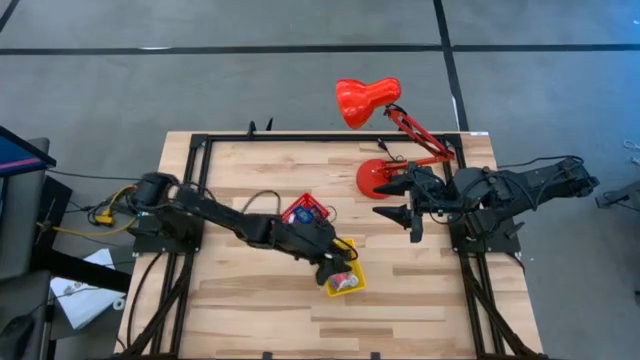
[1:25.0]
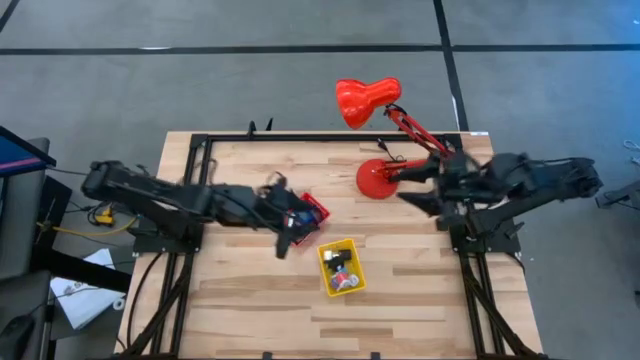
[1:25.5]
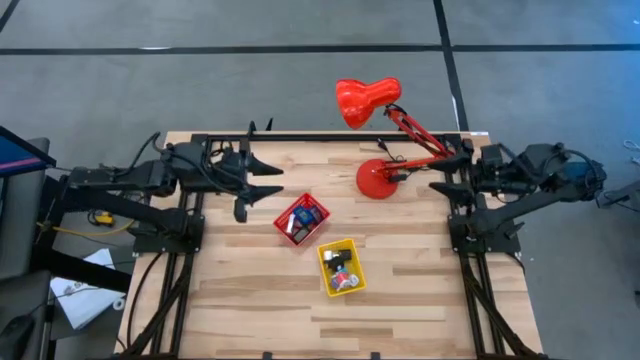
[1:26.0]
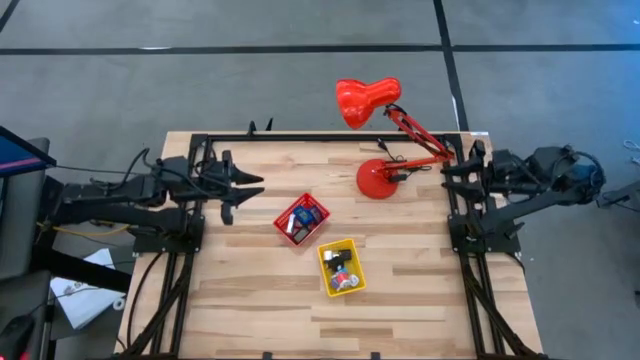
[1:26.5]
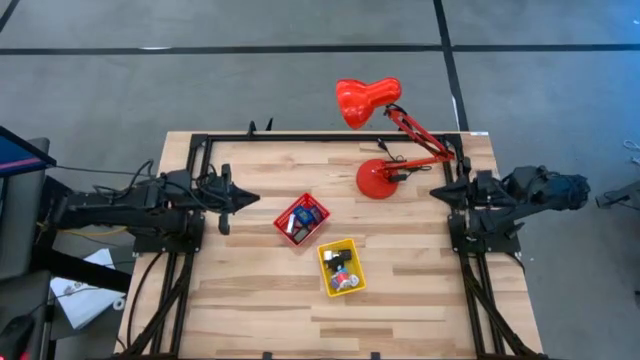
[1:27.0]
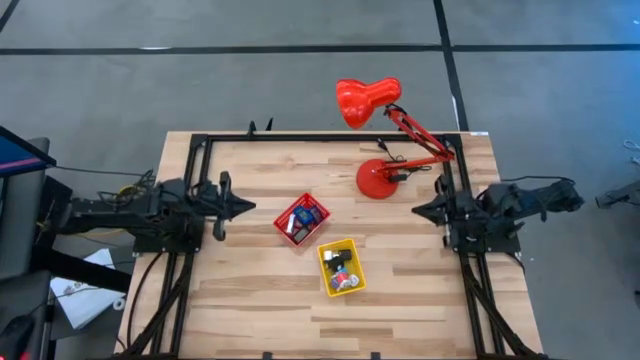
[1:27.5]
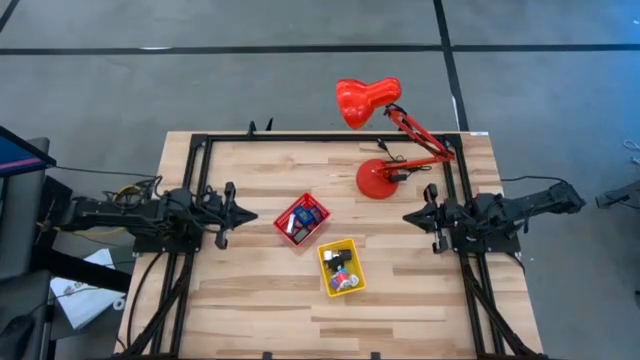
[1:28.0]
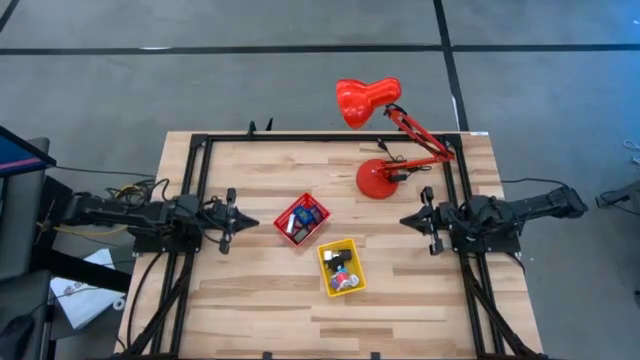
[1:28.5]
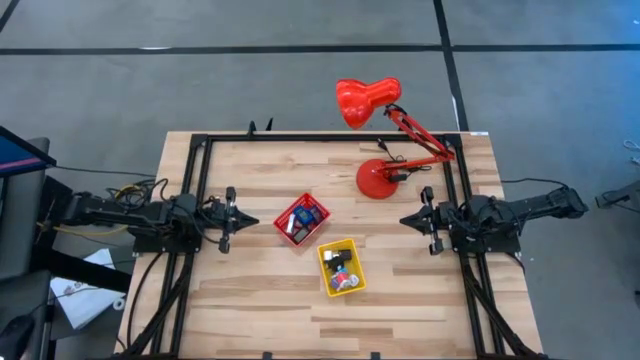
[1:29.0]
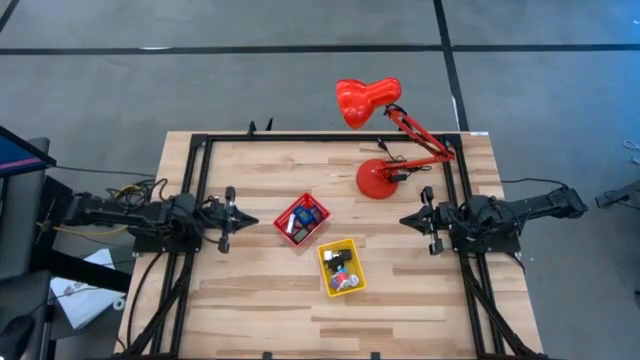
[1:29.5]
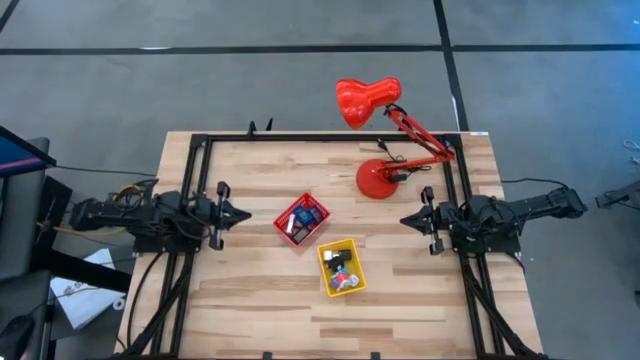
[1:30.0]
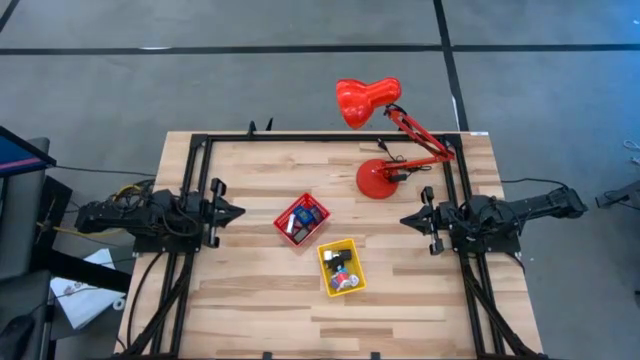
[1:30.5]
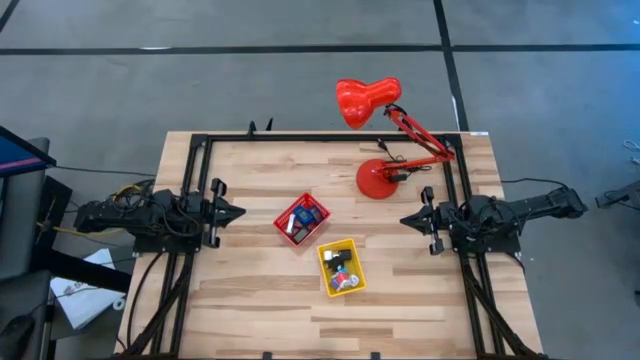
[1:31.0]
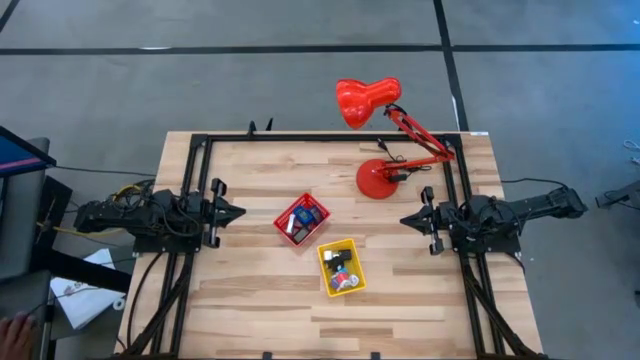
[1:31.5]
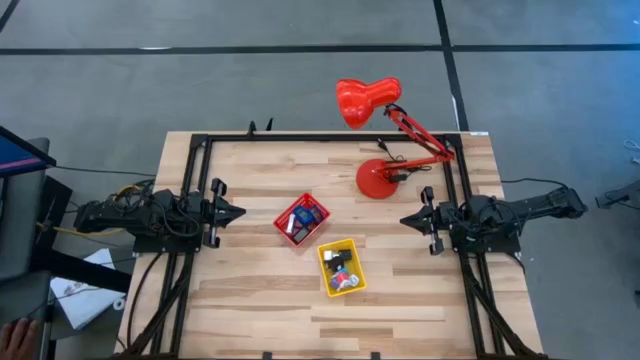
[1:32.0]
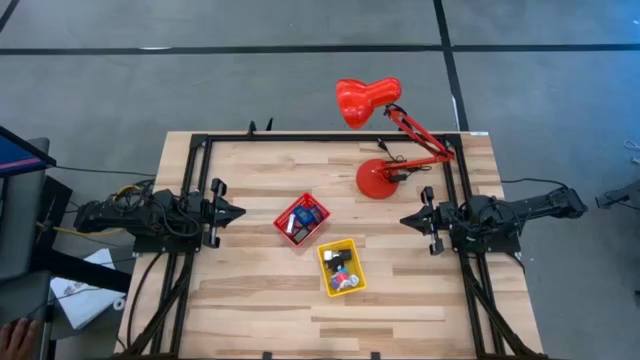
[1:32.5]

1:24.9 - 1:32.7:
Task: Pick & Place Office items
Return to Home Position

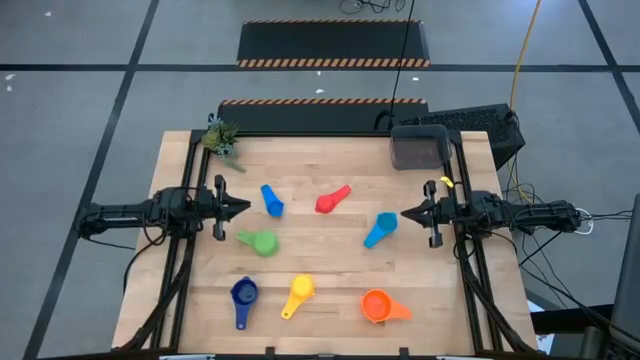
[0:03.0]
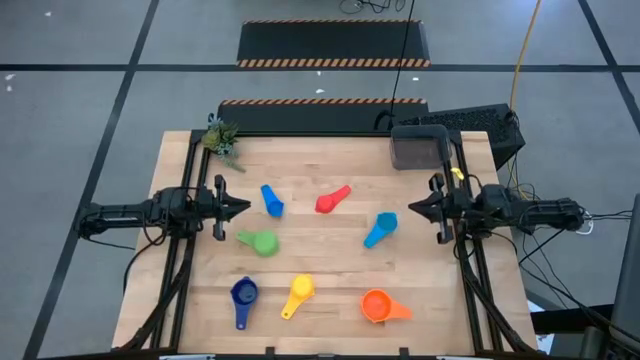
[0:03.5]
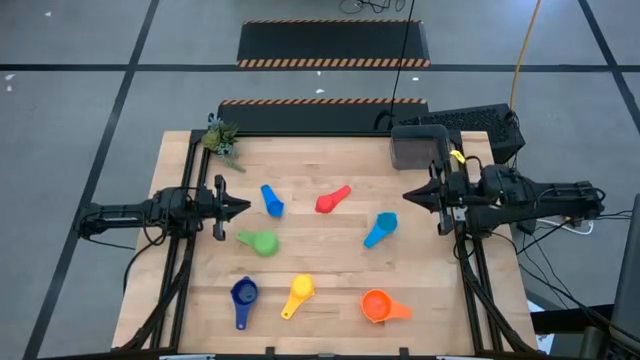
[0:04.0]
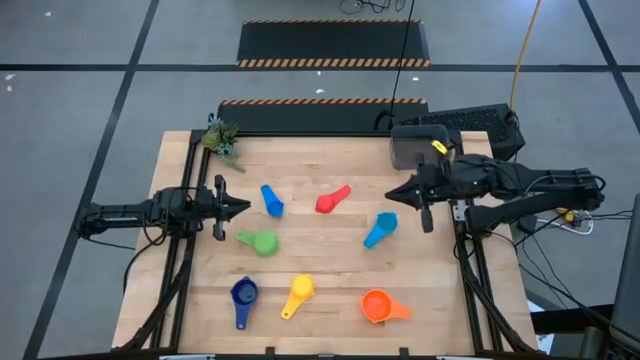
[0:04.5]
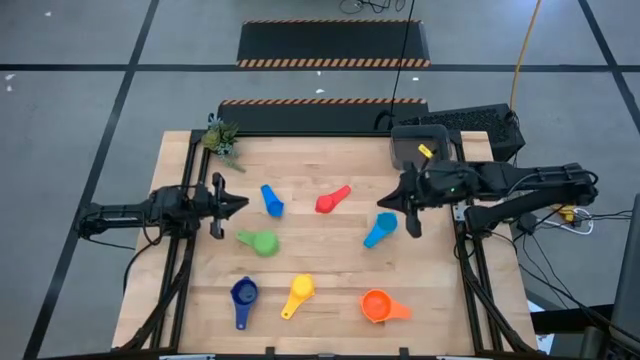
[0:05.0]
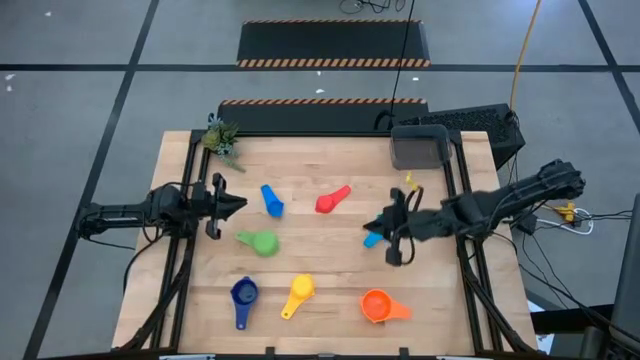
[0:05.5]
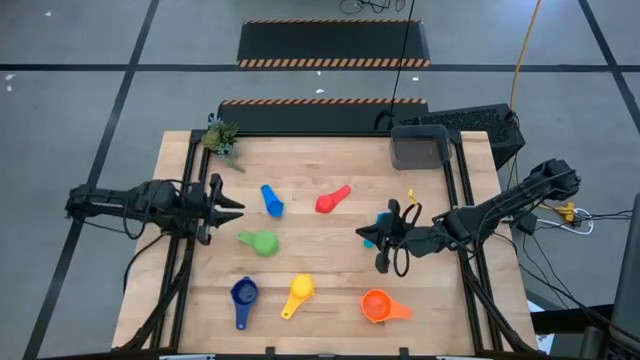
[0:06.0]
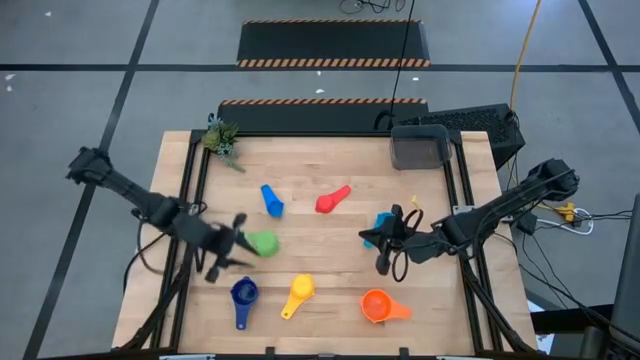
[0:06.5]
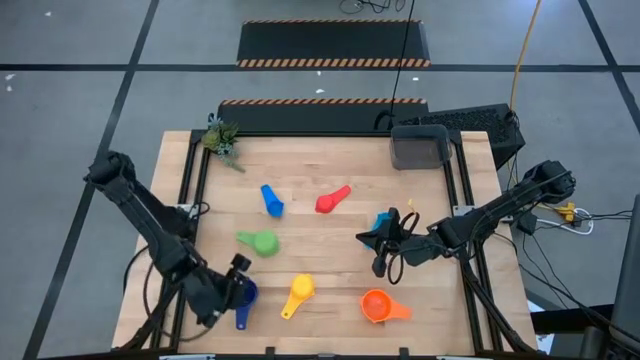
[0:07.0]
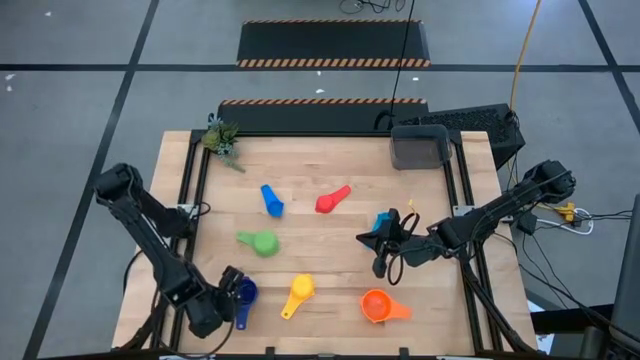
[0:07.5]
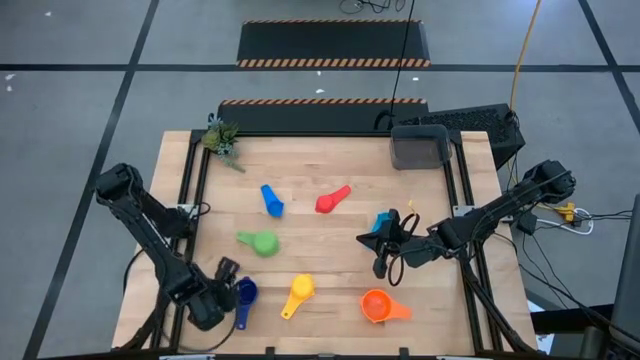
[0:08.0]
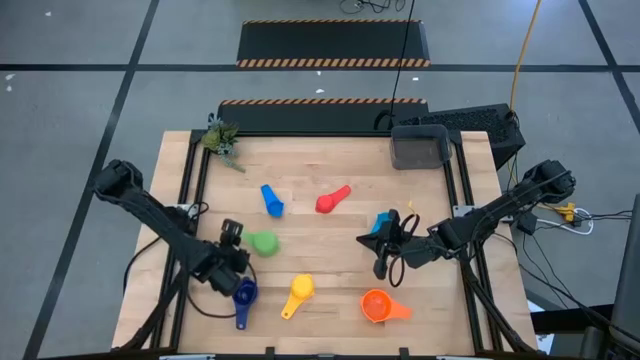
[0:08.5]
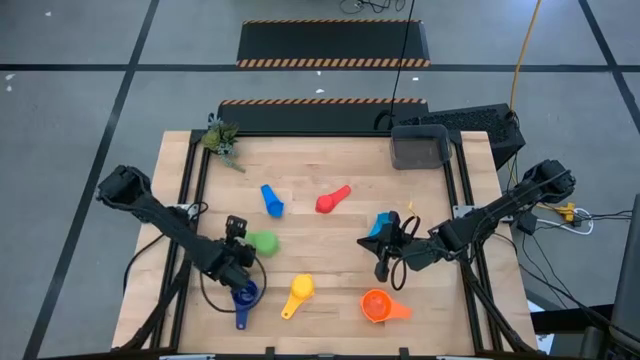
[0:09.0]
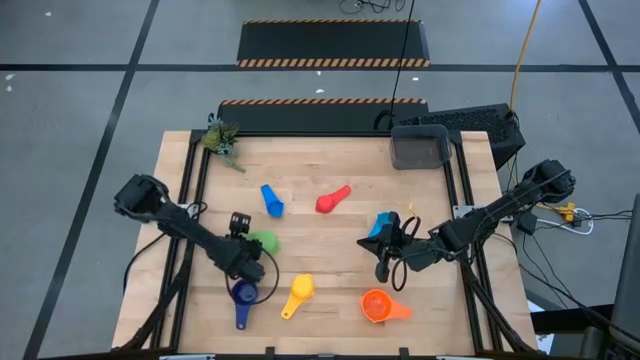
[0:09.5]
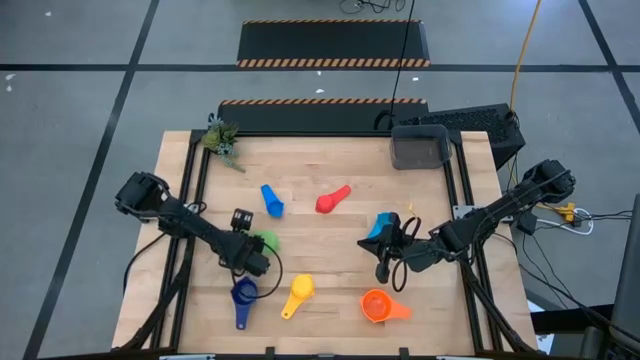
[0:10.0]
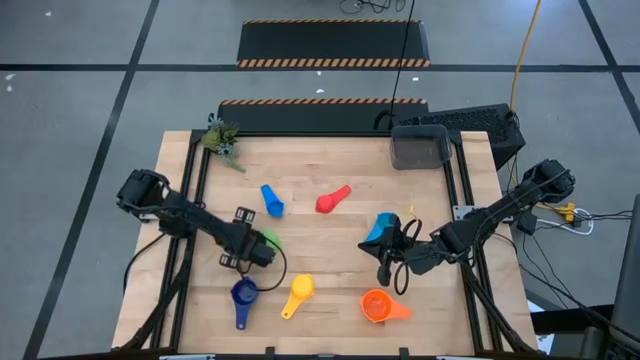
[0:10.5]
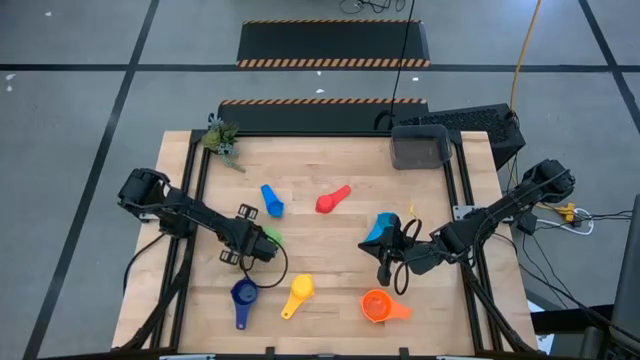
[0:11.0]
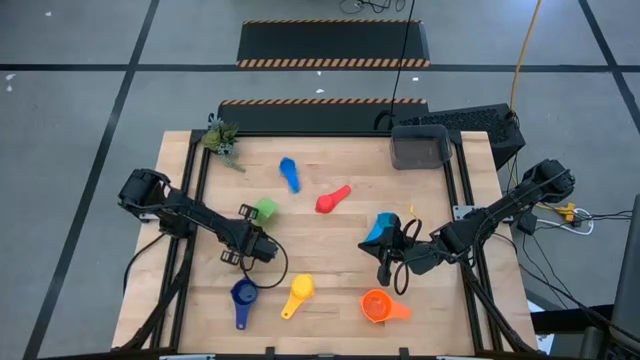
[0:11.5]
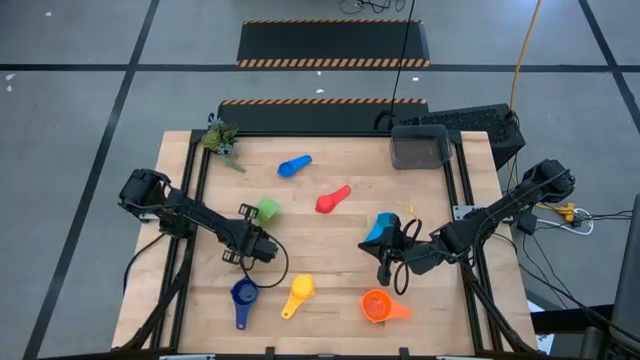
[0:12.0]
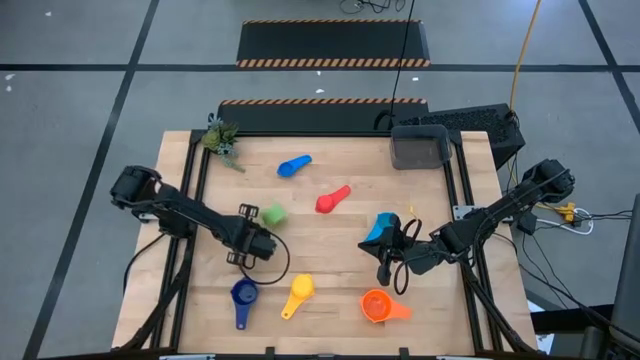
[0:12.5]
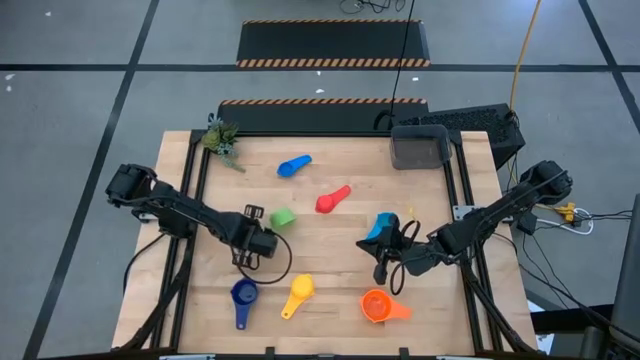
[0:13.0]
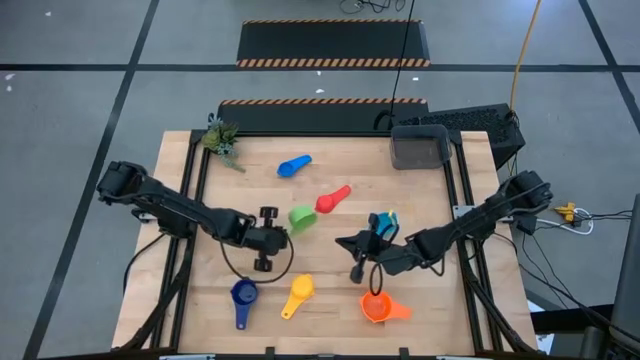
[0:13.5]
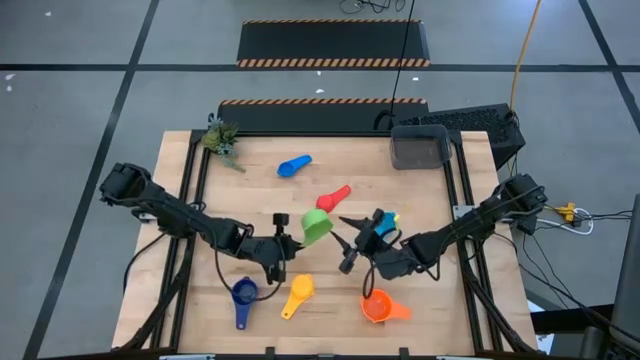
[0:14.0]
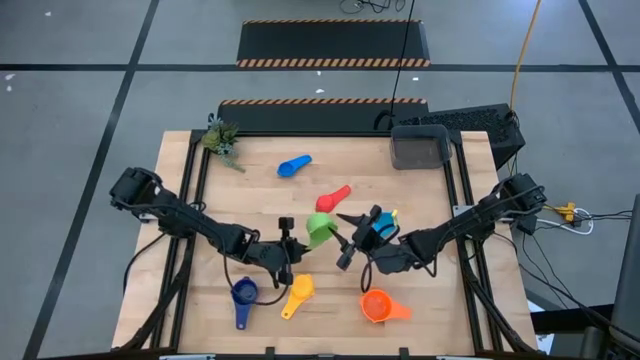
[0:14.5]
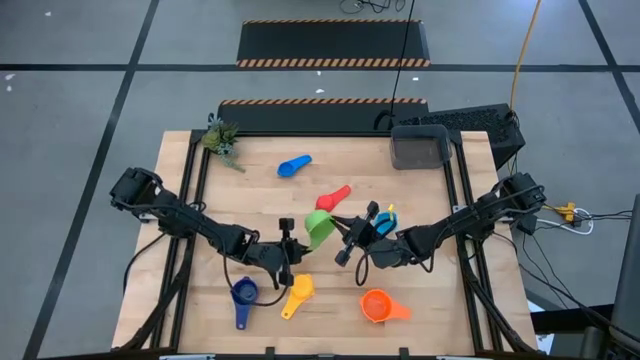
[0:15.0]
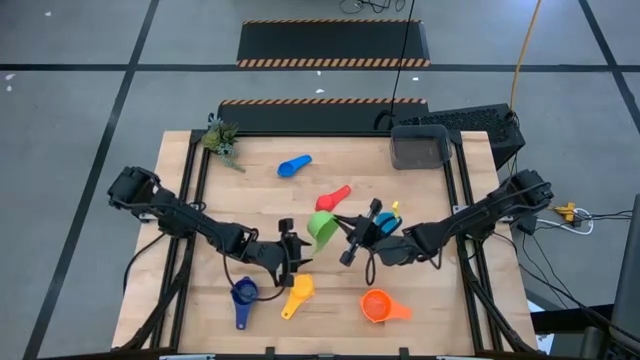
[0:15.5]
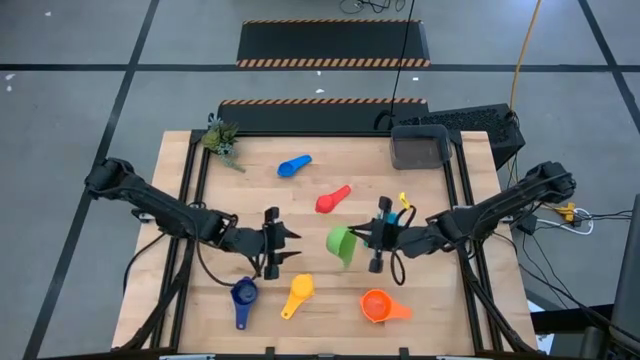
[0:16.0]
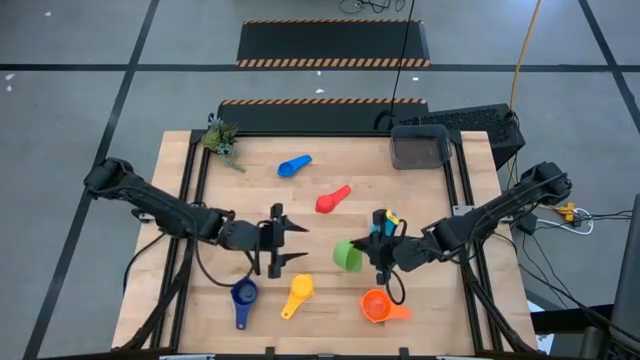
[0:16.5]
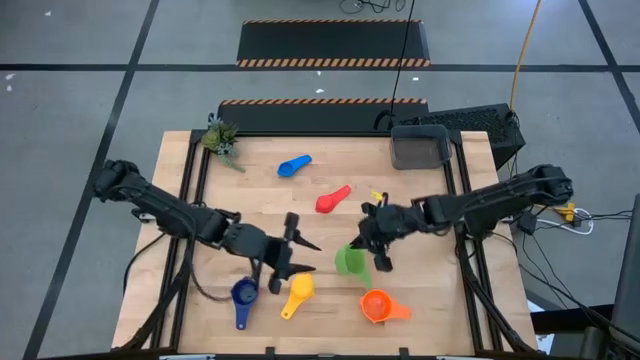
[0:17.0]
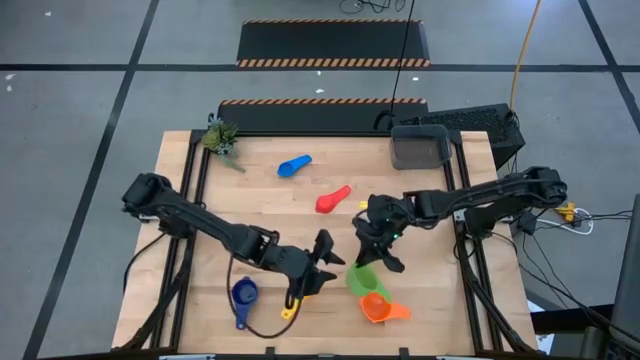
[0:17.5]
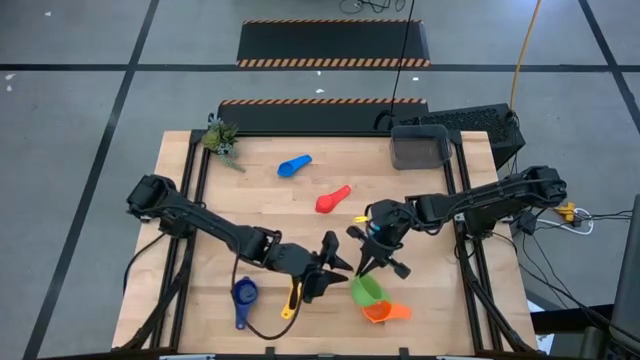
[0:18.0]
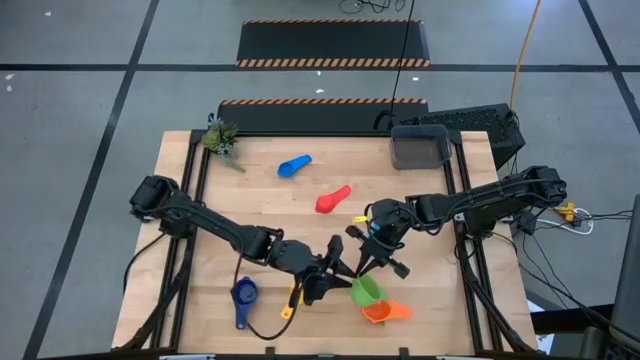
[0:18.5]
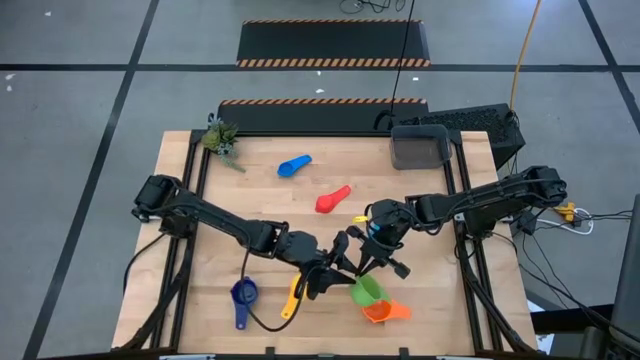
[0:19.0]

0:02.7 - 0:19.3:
Task: Nest measuring cups in basket
Stack the green measuring cup on top of the orange measuring cup
